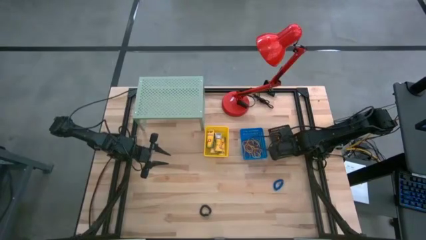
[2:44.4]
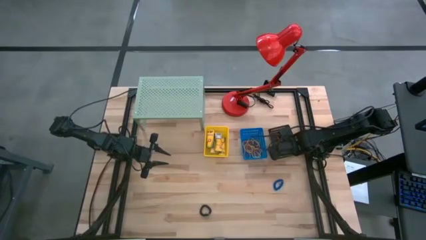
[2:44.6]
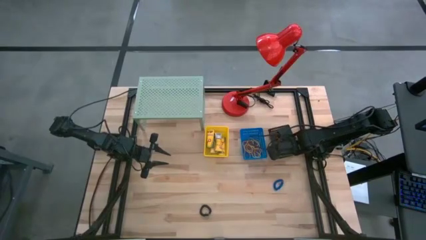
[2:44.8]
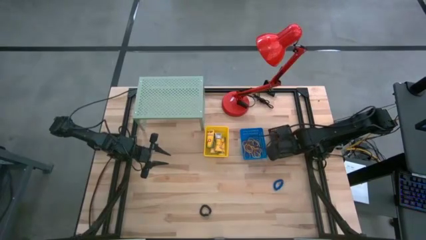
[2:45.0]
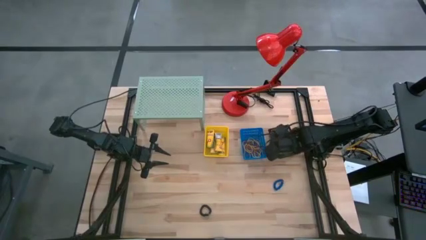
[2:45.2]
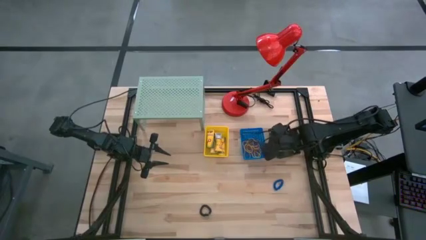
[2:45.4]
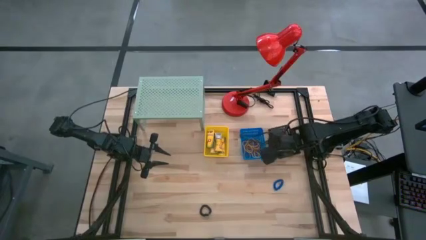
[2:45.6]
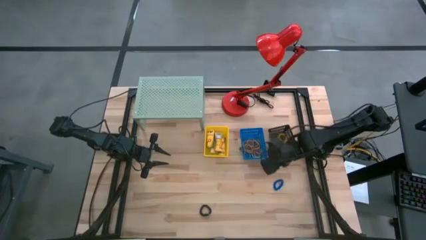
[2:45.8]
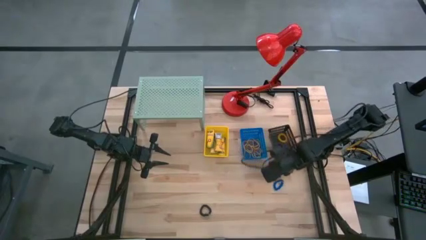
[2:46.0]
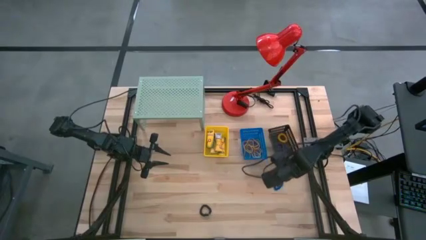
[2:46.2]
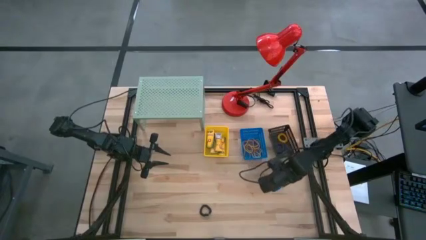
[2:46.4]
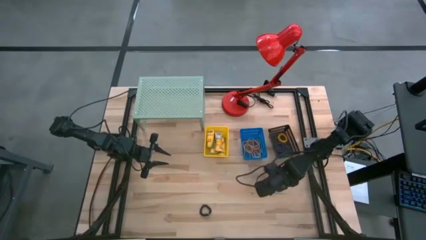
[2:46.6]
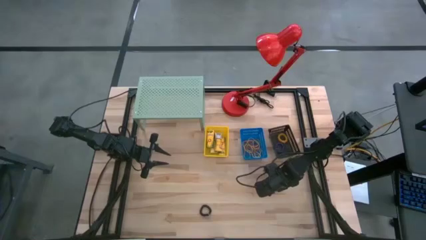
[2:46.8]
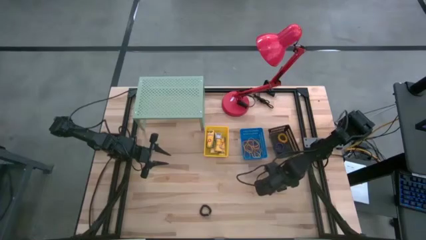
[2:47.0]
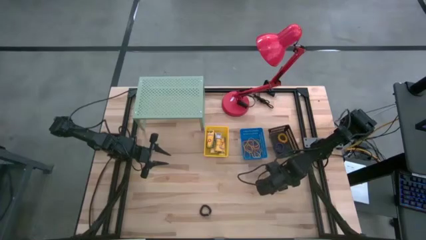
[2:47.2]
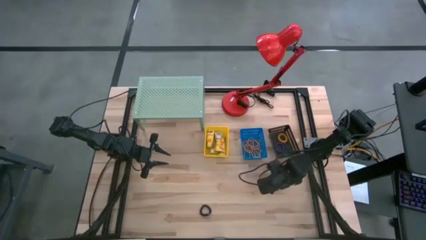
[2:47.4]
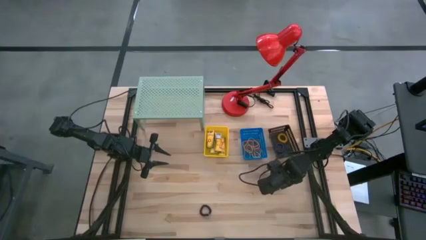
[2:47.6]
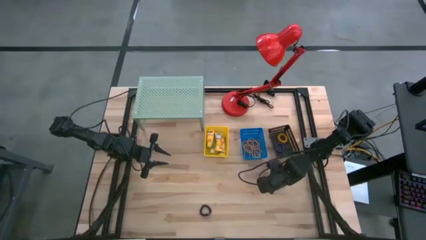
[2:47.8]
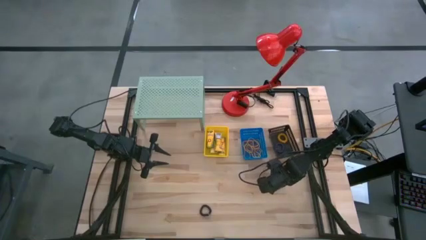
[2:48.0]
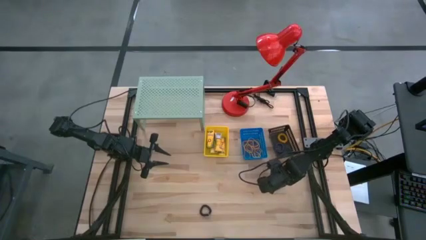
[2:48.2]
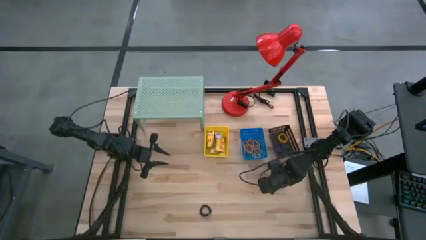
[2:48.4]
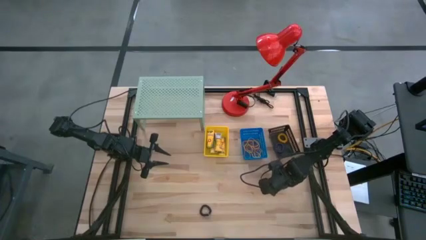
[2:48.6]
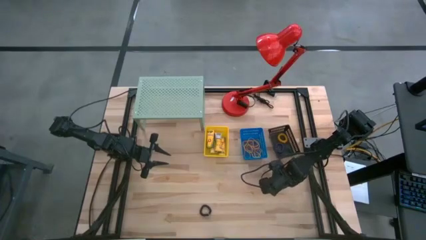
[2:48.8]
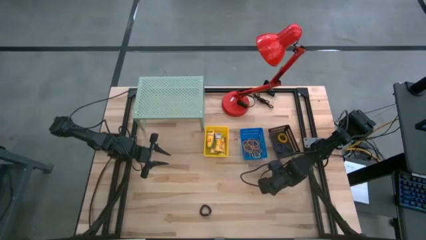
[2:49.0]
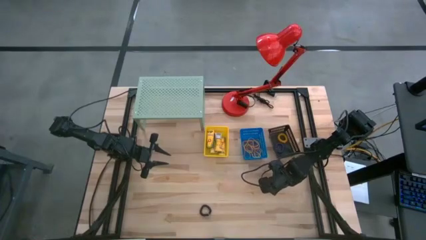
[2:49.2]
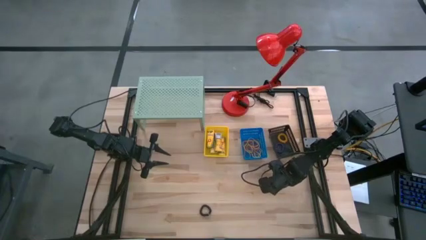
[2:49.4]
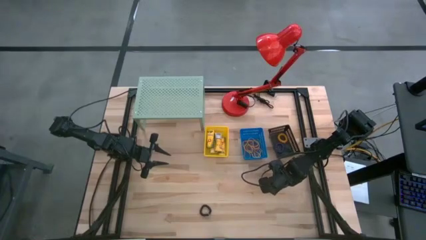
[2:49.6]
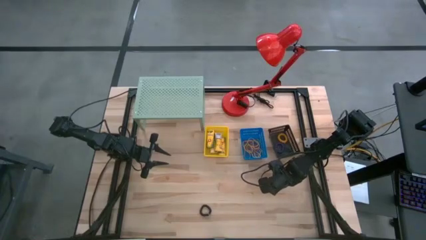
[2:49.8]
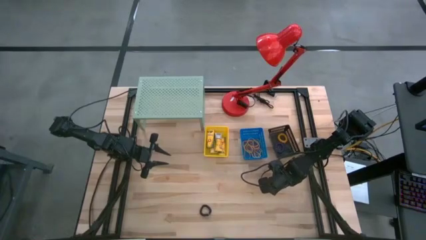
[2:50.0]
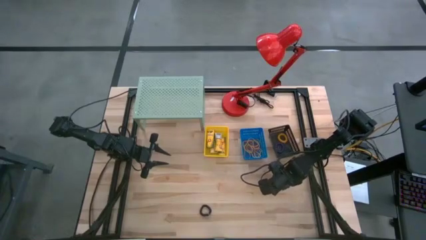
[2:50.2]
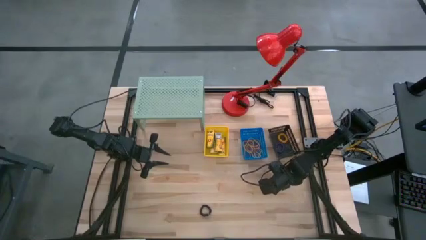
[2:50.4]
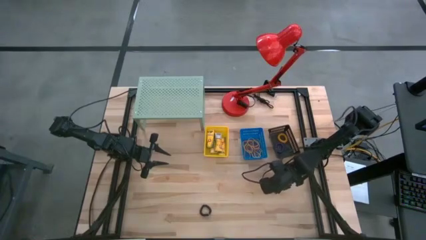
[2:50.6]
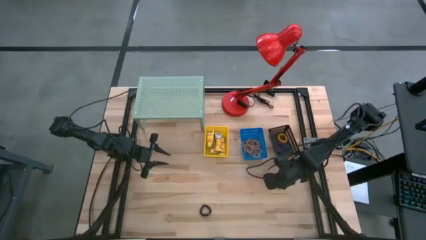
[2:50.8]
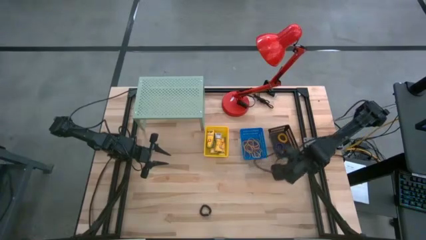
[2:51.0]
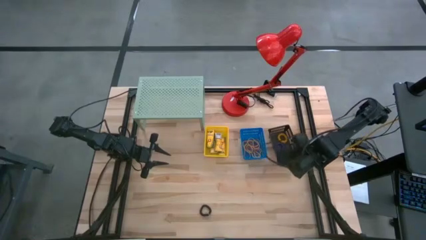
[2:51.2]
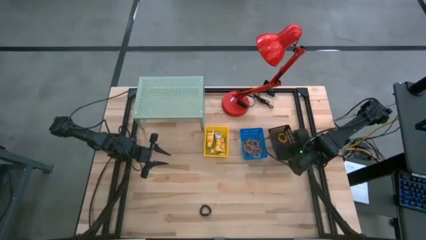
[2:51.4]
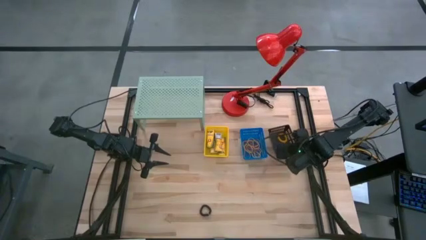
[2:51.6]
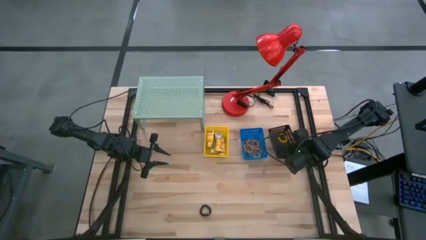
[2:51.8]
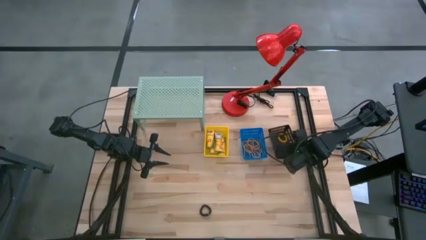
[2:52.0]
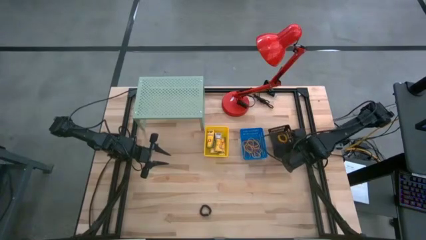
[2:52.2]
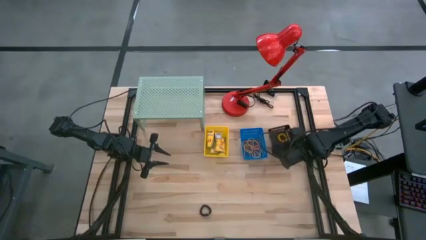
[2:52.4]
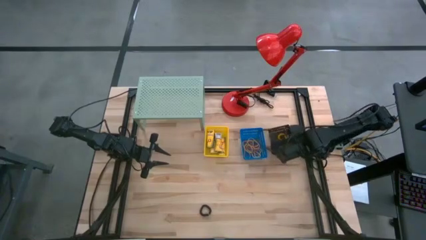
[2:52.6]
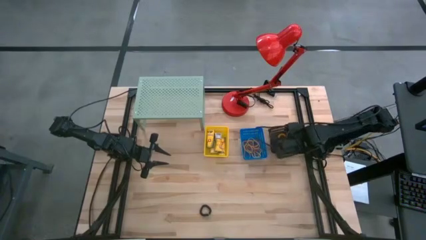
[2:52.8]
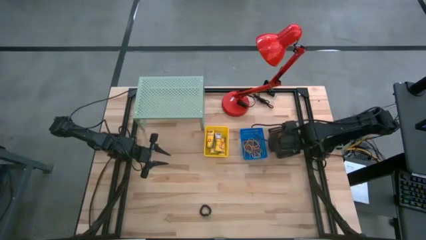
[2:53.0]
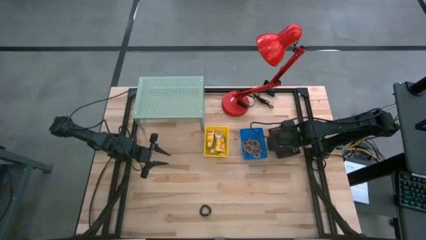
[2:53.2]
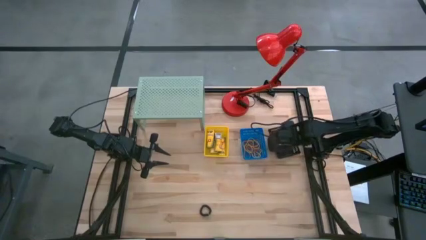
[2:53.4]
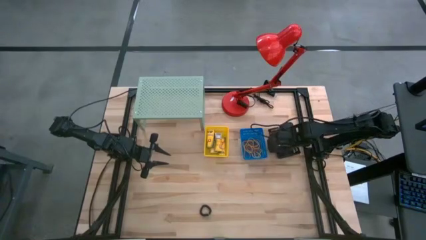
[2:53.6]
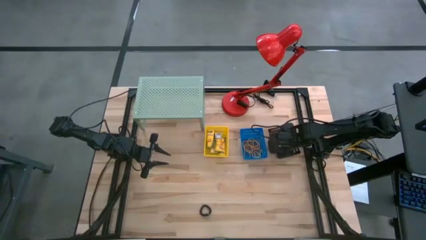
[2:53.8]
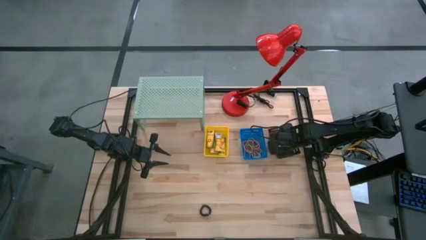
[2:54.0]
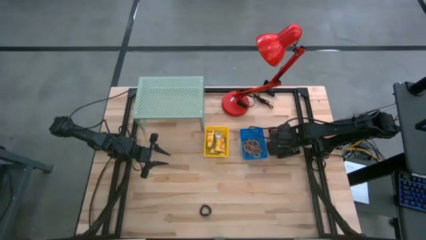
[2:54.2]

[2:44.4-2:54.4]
Task: Pick & Place Office Desk Supplies
Put the blue spring keychain into the black basket

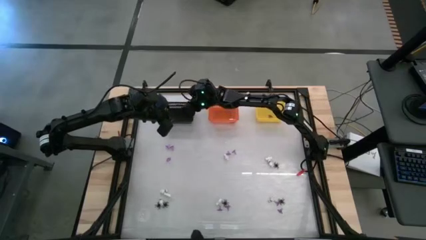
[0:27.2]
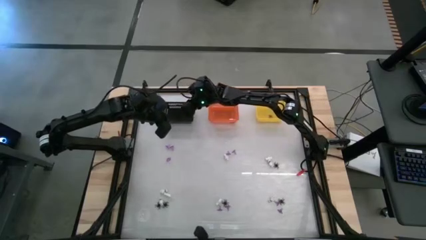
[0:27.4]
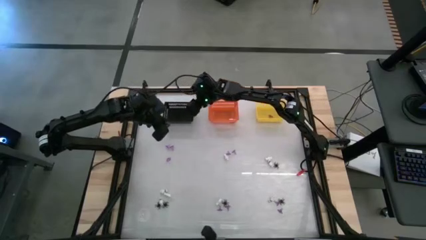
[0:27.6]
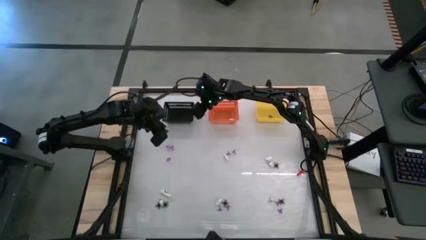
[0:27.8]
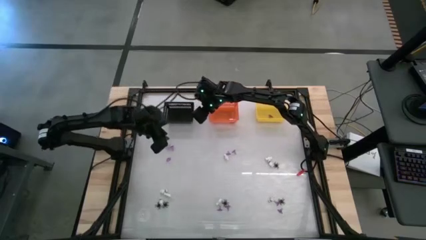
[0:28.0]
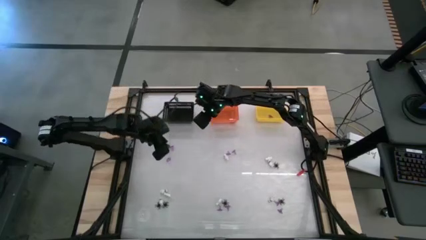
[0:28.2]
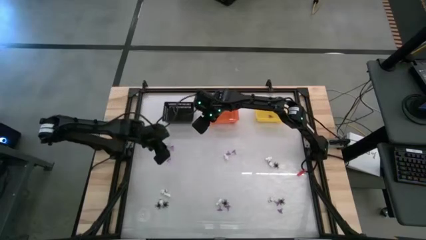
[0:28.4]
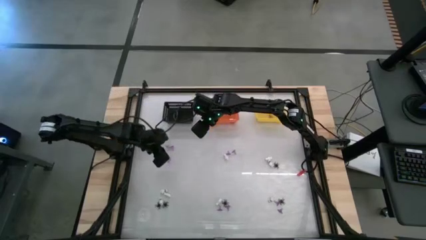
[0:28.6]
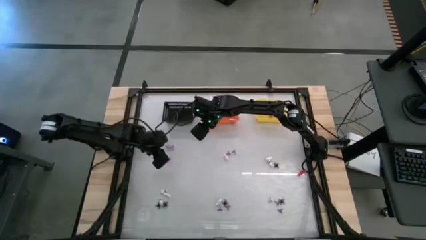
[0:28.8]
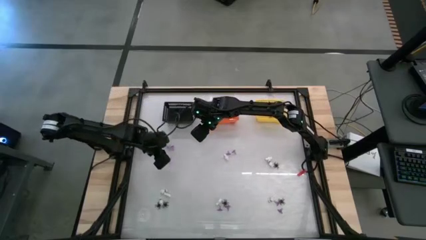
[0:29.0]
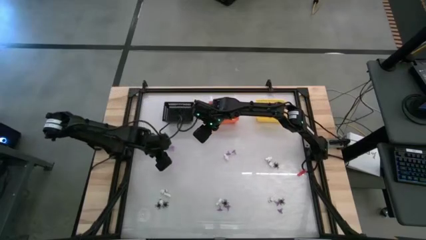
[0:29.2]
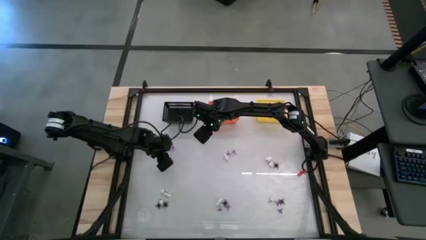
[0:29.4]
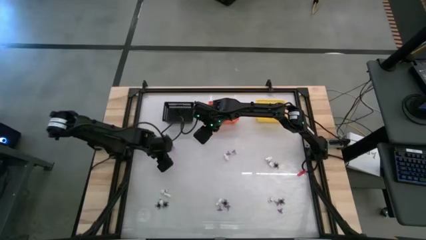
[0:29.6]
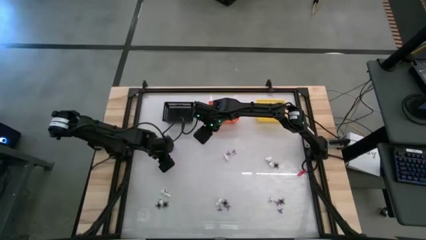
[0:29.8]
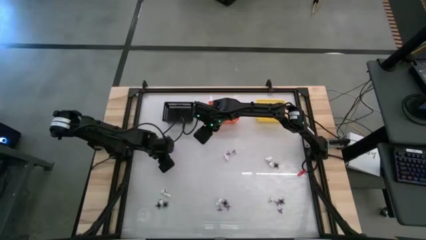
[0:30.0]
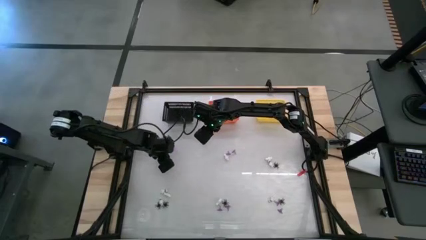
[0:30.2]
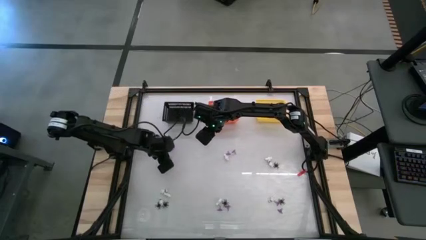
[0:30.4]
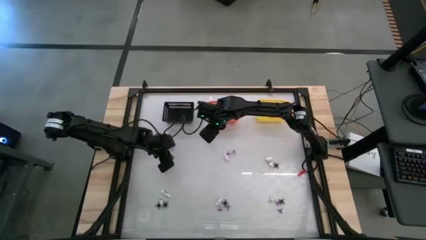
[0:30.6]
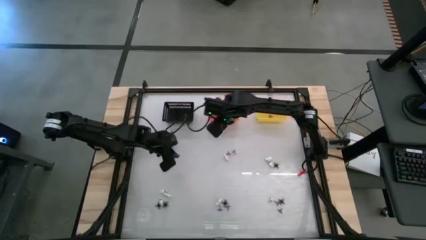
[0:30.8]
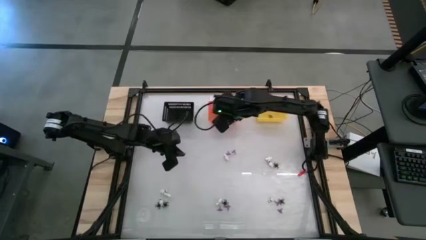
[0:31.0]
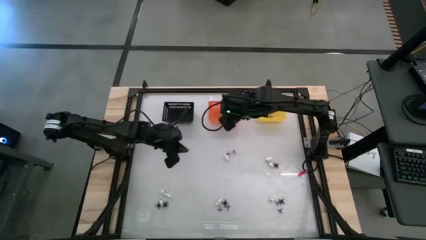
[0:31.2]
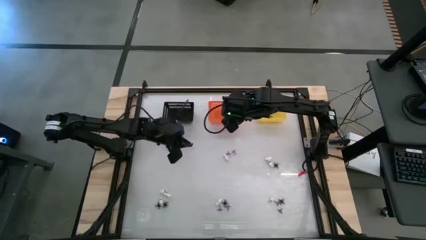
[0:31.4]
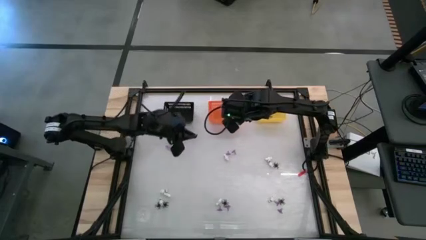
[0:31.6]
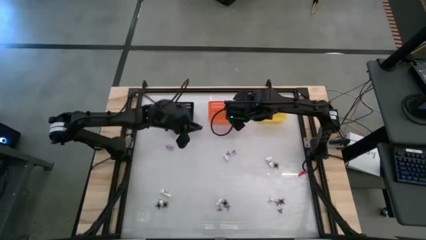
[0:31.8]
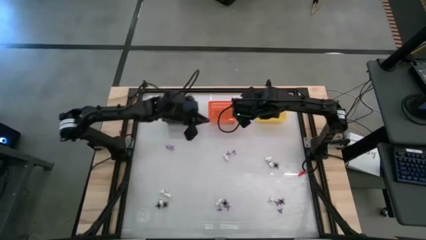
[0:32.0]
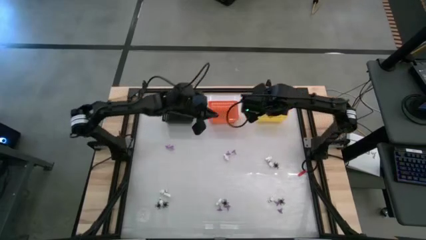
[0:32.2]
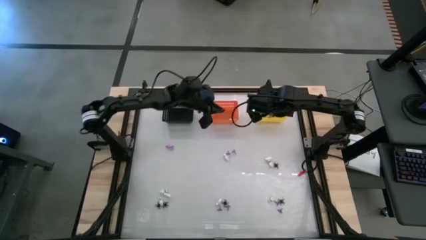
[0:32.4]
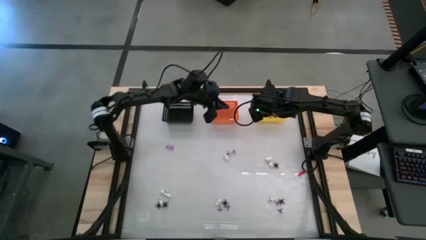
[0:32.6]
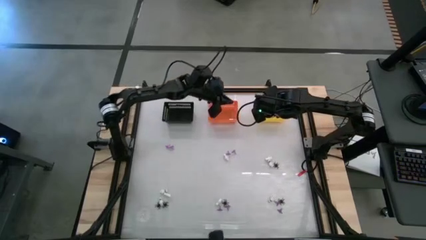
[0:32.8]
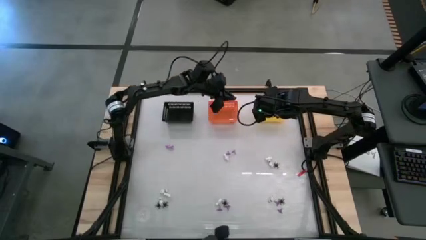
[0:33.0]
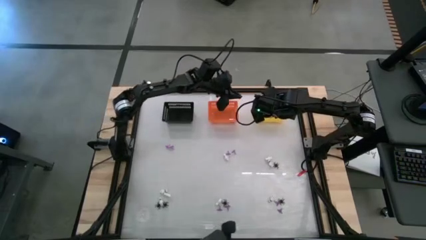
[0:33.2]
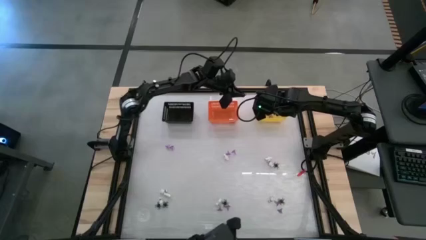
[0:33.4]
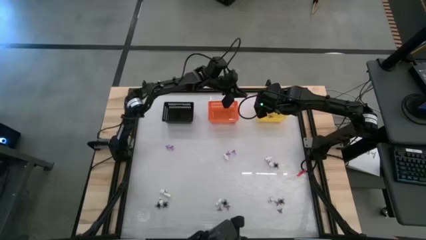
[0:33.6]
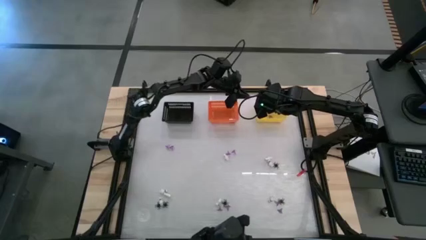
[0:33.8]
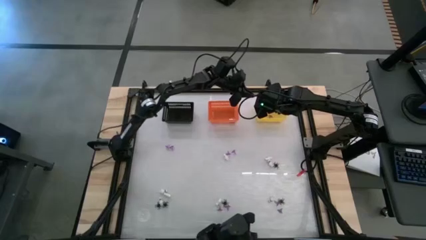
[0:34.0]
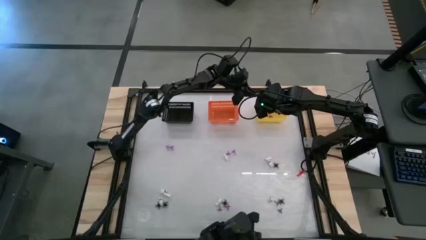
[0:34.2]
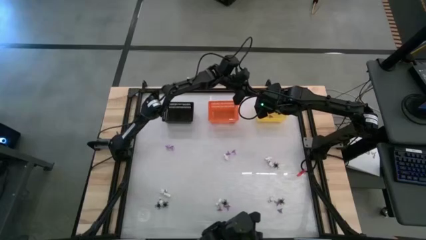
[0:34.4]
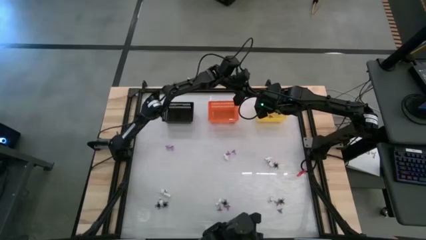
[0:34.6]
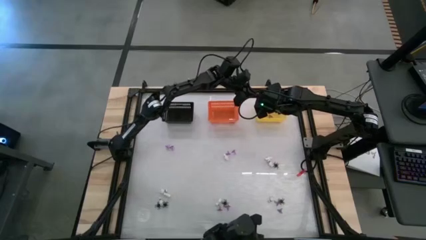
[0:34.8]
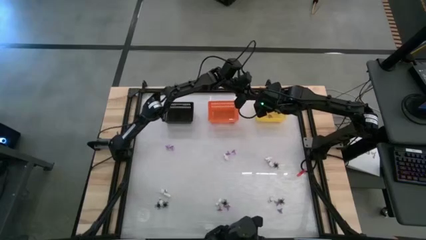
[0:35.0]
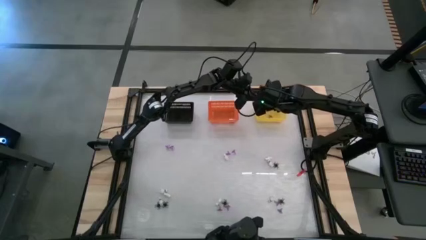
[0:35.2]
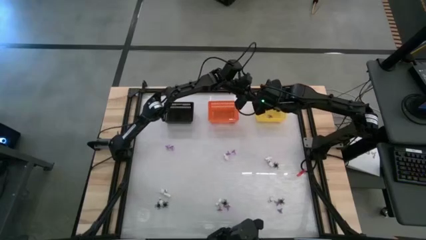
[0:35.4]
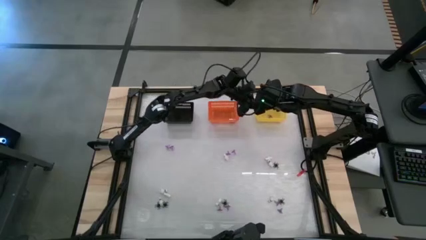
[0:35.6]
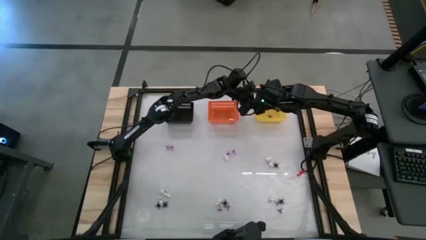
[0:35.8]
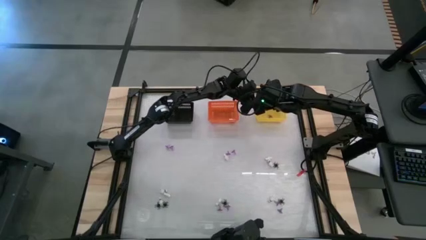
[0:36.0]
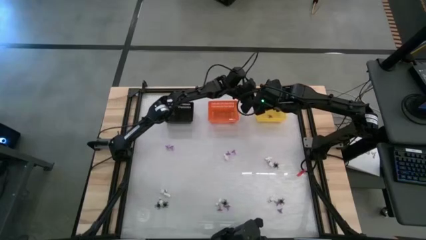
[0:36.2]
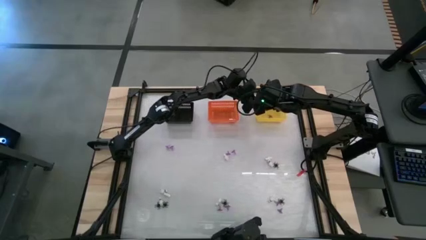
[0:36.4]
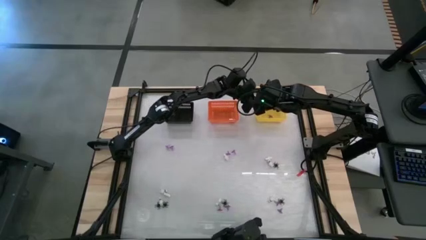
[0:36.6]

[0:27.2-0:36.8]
Task: Sort Halloween decoration
Put the witch hat toy into the yellow bin
